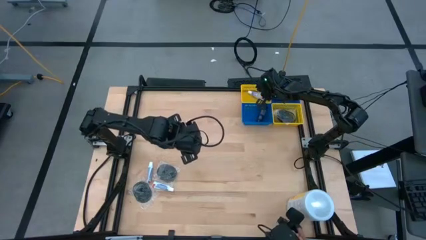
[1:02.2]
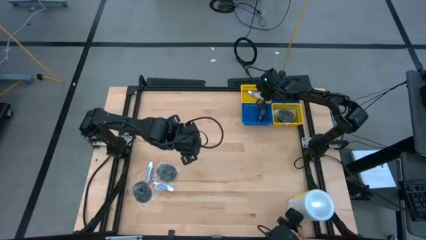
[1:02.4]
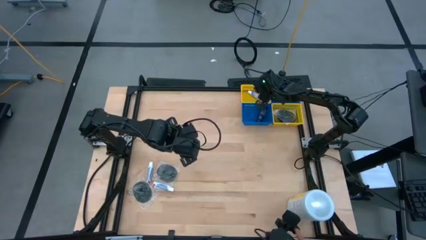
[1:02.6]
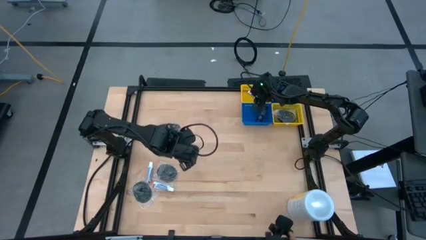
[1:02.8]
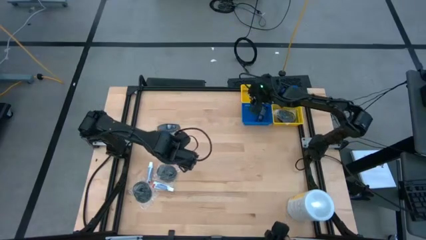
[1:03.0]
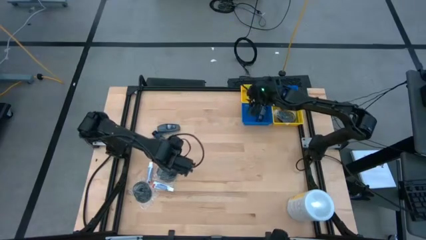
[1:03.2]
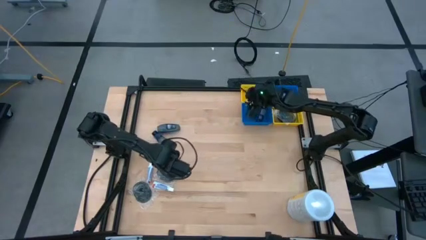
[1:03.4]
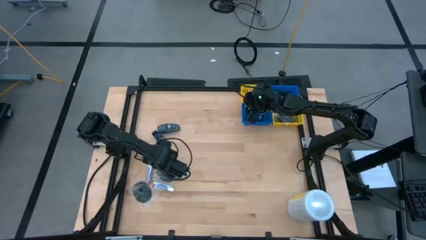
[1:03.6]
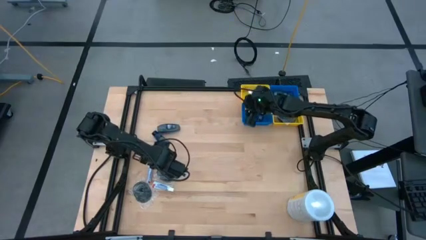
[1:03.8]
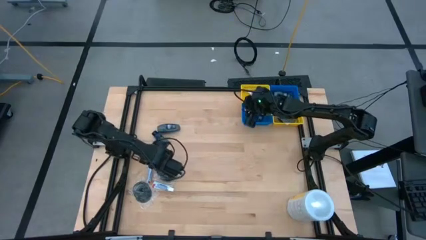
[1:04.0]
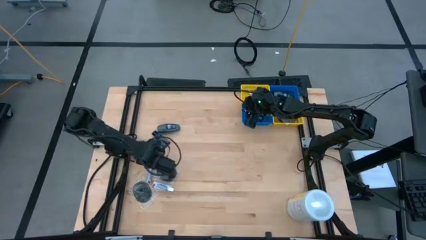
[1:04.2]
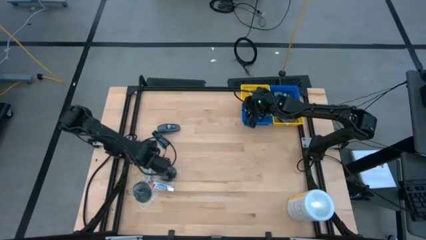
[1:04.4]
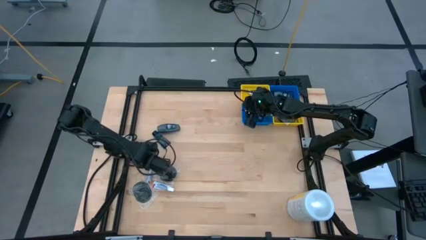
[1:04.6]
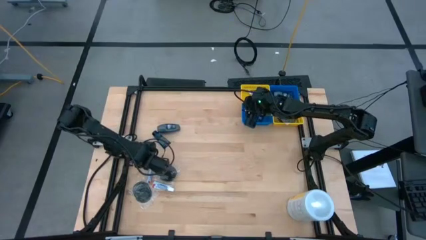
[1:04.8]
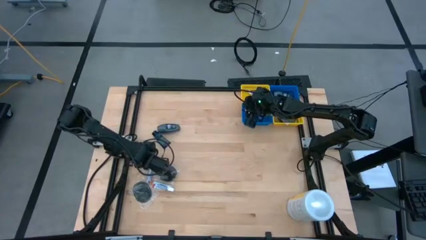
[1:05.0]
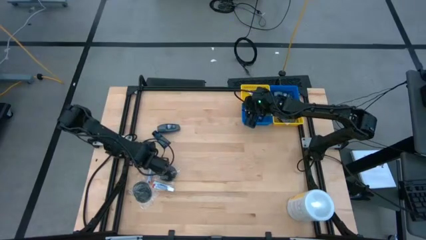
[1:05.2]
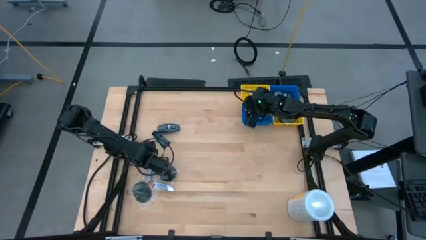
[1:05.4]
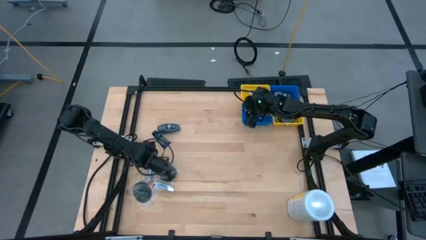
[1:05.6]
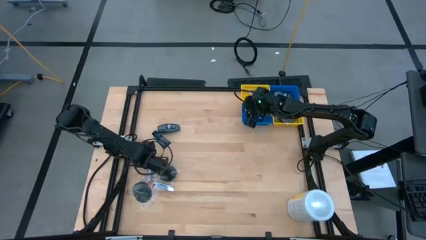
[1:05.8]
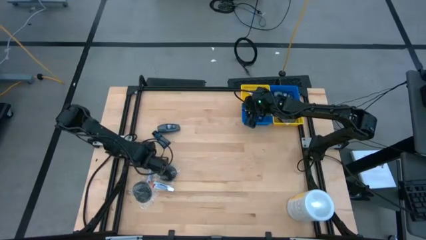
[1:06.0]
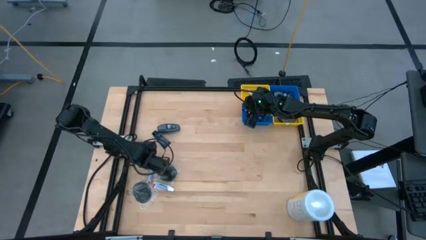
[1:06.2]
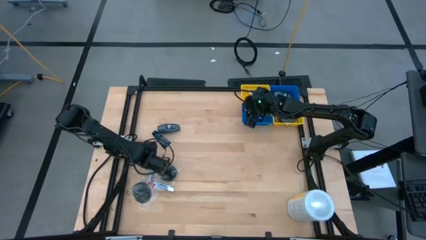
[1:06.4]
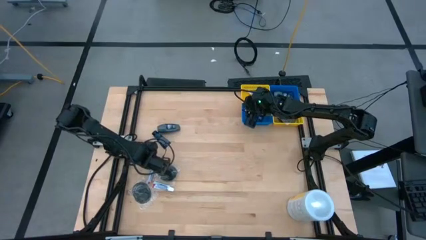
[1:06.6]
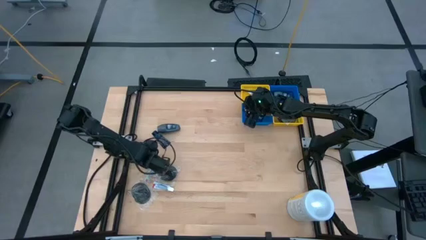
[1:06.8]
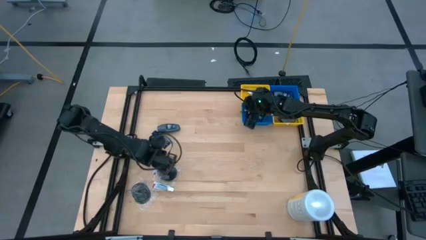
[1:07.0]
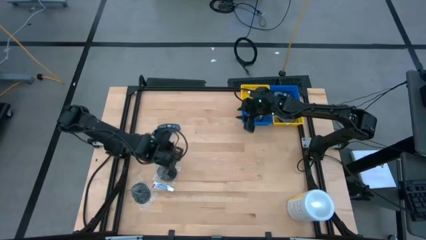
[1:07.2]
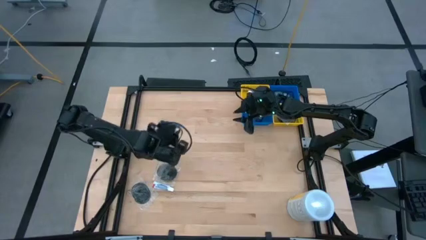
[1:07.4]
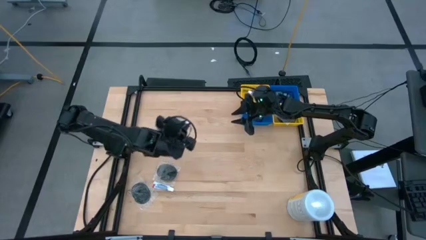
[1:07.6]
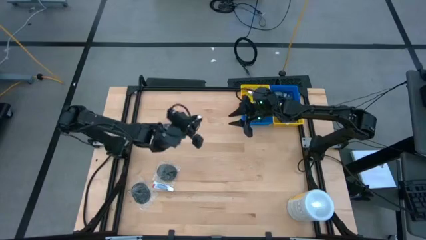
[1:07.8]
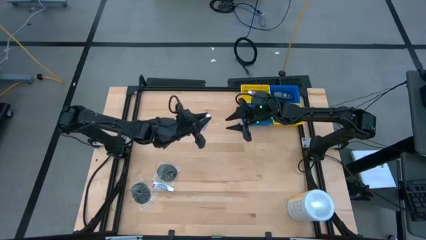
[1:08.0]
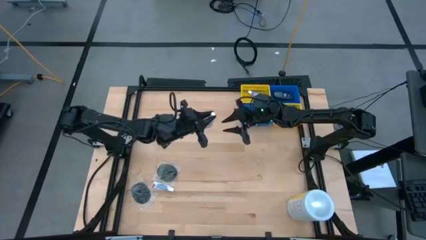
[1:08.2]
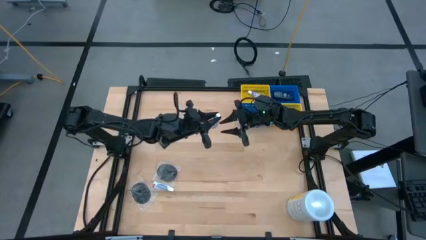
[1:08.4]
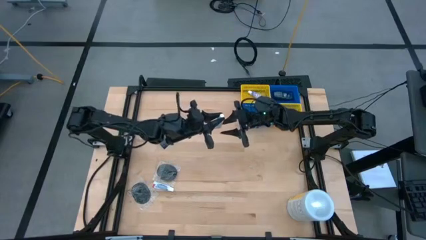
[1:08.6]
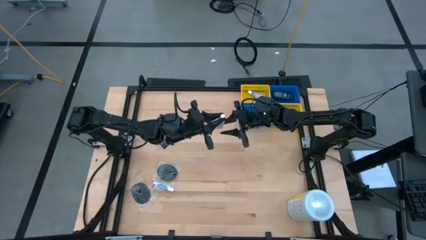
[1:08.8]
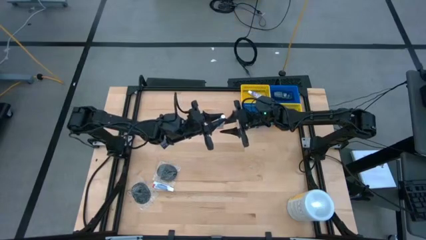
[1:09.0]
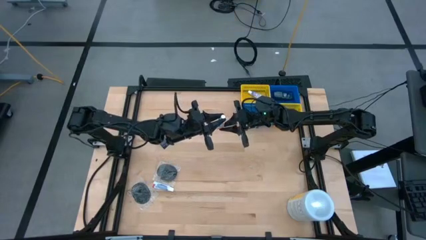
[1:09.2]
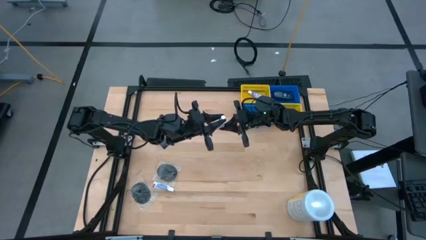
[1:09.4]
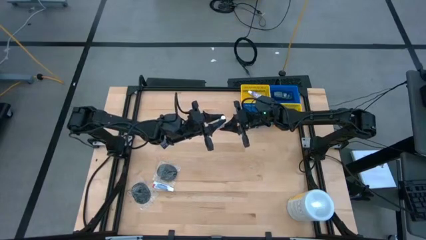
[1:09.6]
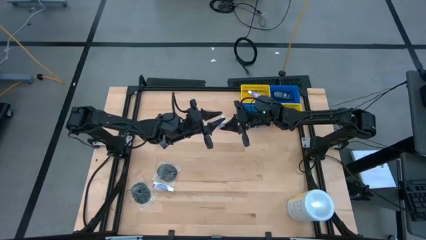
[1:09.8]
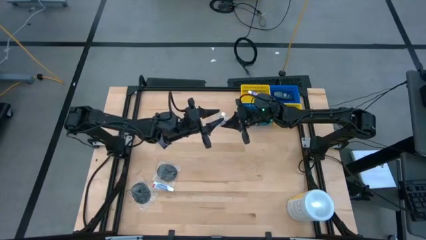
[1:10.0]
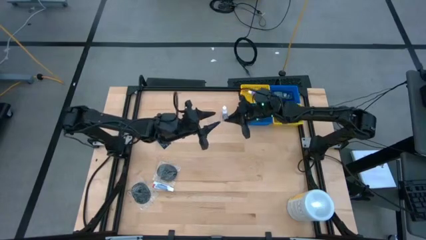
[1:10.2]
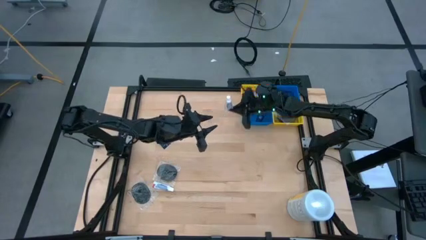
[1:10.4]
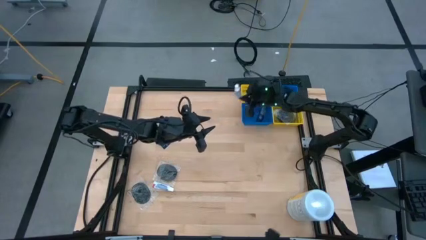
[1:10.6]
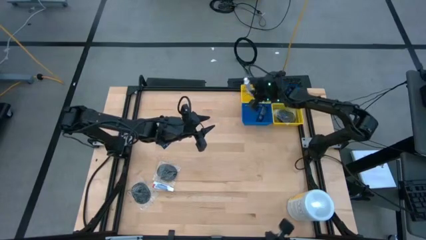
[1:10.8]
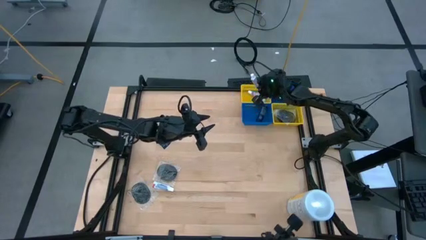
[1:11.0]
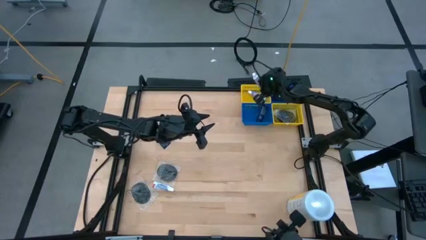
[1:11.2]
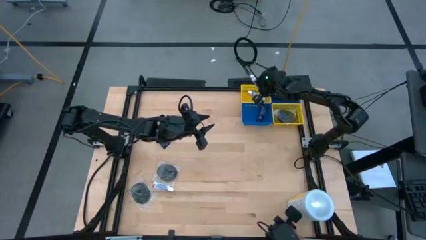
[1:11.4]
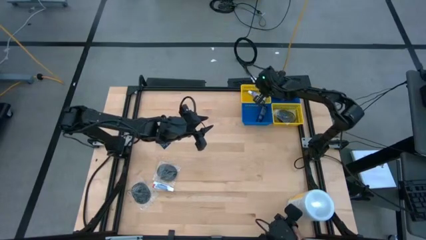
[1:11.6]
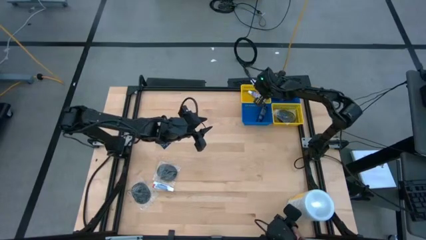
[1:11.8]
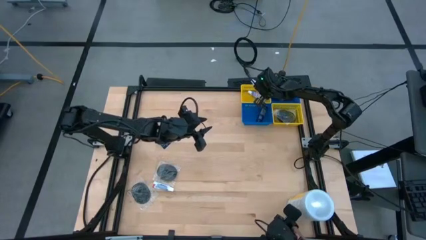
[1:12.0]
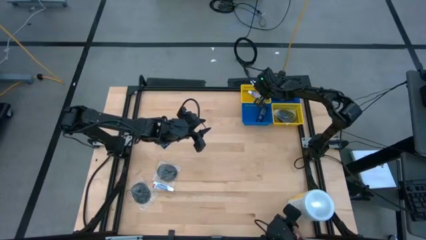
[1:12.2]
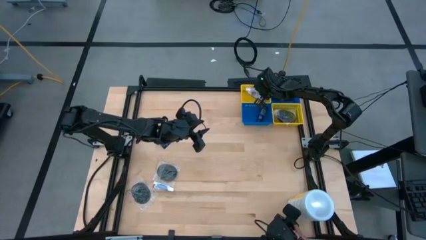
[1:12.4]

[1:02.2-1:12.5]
Task: Pick & Place Travel size toiletries
Put the top white toothpaste into the top yellow basket
